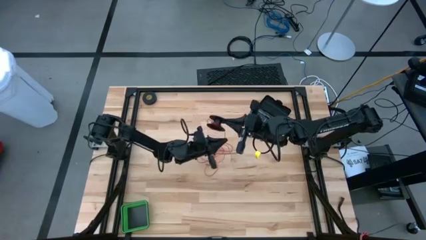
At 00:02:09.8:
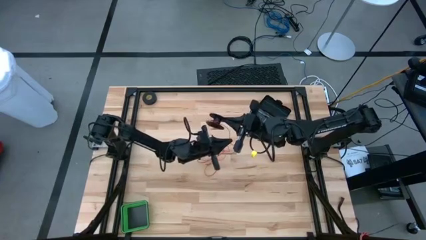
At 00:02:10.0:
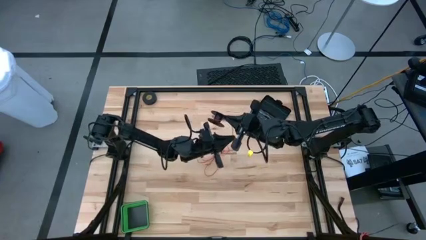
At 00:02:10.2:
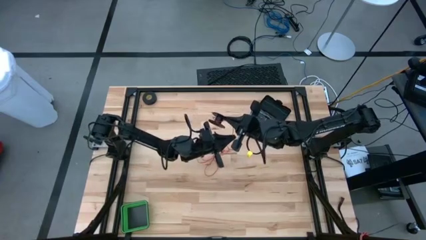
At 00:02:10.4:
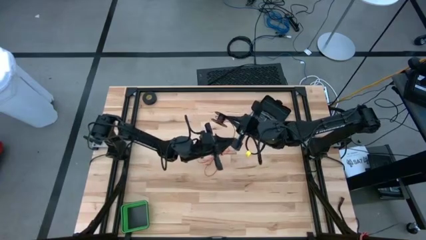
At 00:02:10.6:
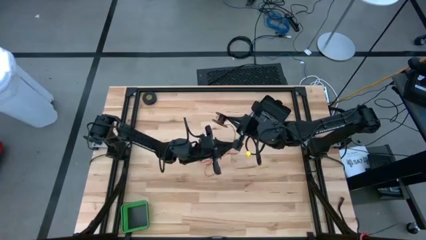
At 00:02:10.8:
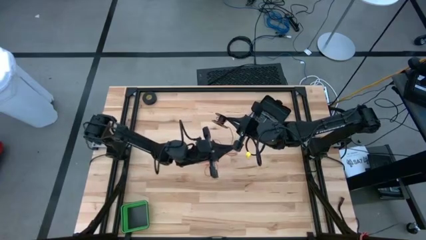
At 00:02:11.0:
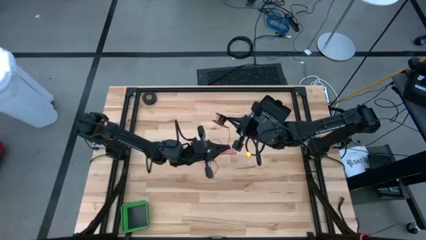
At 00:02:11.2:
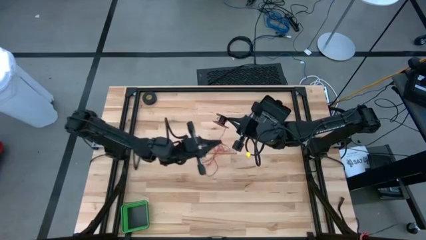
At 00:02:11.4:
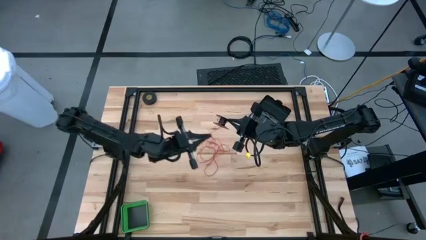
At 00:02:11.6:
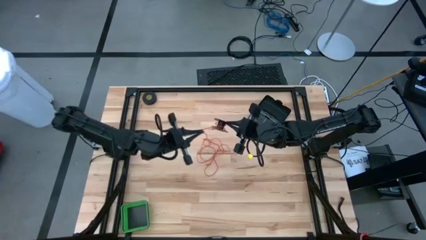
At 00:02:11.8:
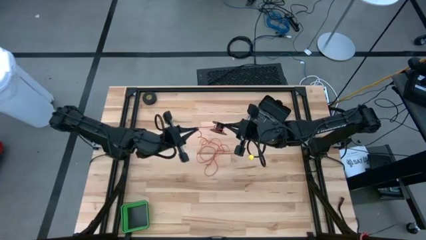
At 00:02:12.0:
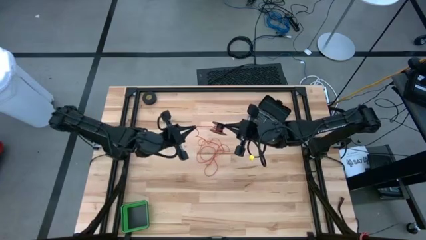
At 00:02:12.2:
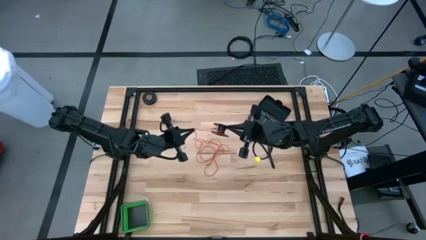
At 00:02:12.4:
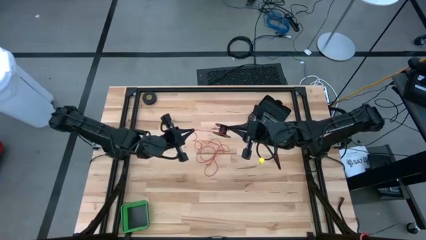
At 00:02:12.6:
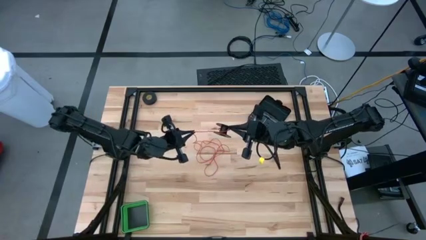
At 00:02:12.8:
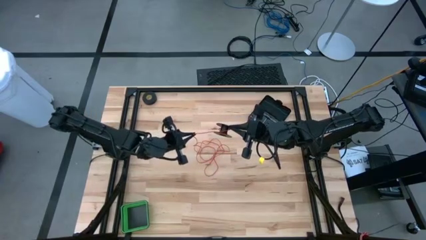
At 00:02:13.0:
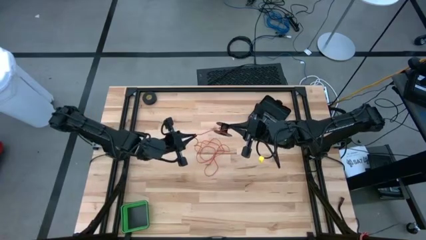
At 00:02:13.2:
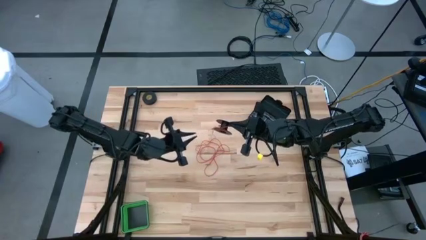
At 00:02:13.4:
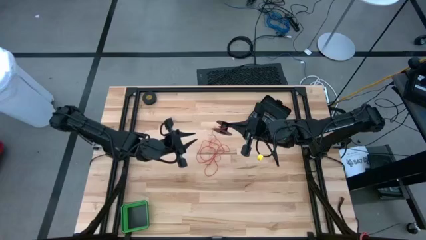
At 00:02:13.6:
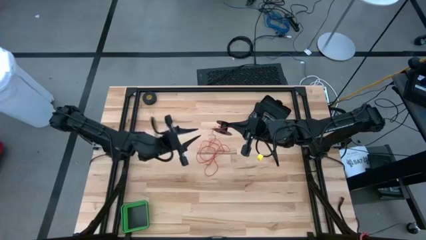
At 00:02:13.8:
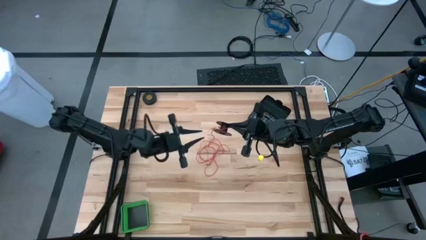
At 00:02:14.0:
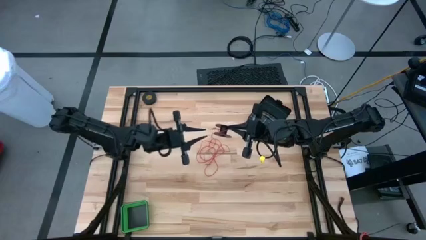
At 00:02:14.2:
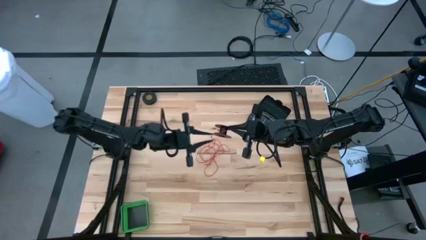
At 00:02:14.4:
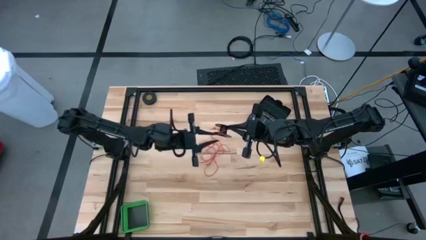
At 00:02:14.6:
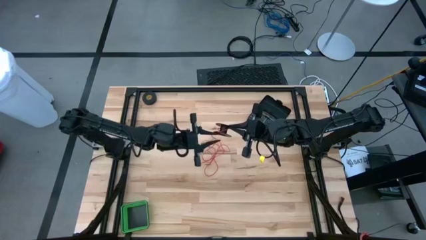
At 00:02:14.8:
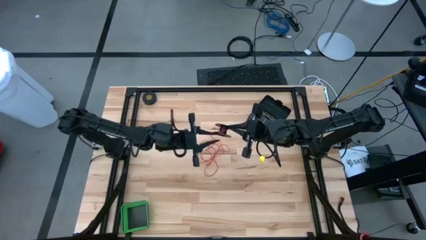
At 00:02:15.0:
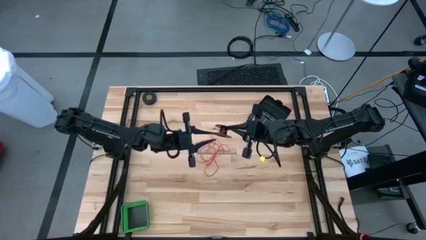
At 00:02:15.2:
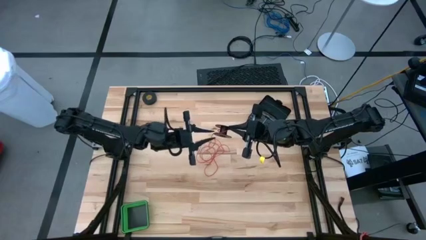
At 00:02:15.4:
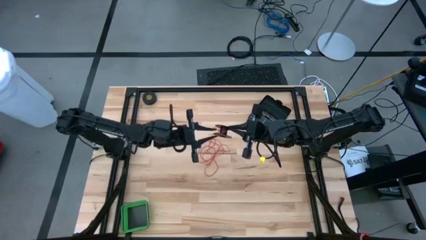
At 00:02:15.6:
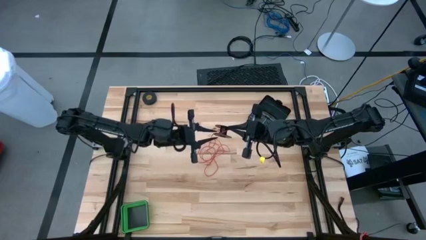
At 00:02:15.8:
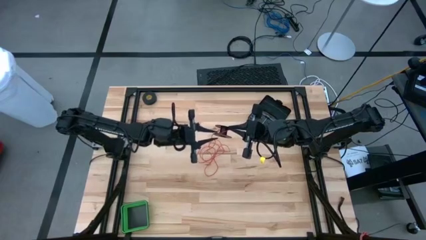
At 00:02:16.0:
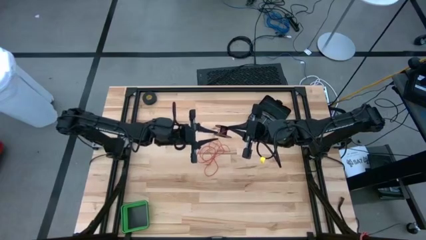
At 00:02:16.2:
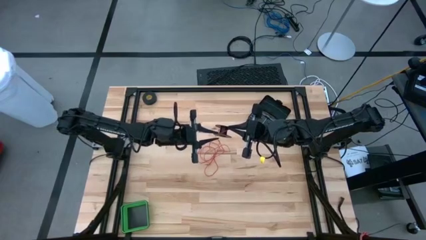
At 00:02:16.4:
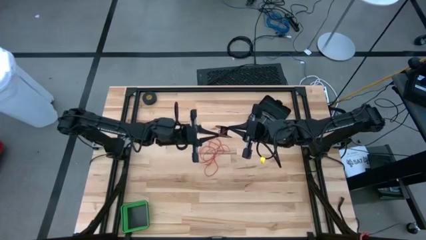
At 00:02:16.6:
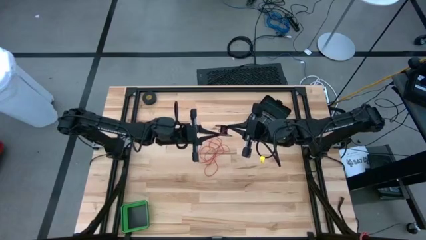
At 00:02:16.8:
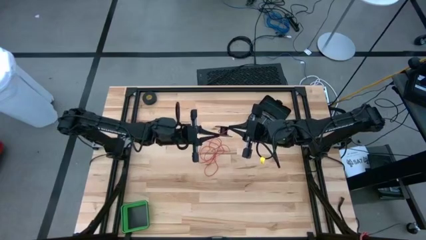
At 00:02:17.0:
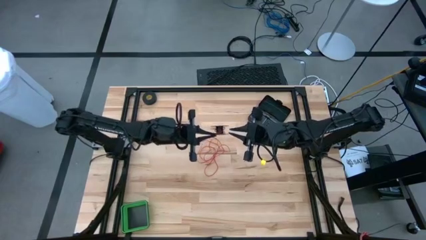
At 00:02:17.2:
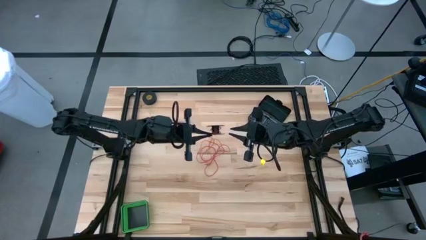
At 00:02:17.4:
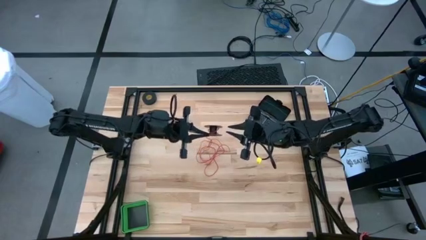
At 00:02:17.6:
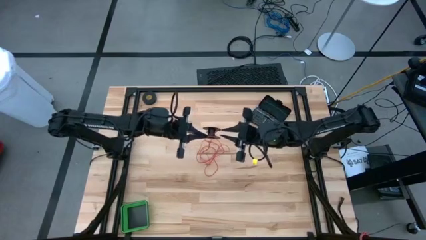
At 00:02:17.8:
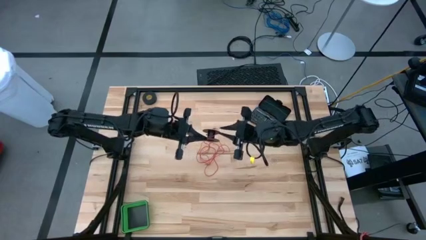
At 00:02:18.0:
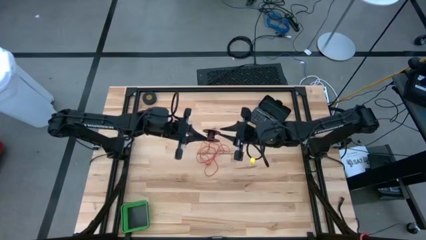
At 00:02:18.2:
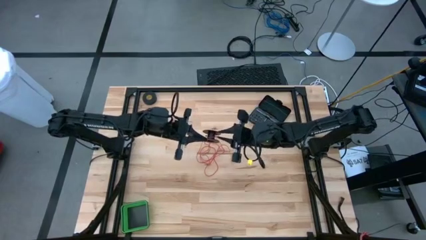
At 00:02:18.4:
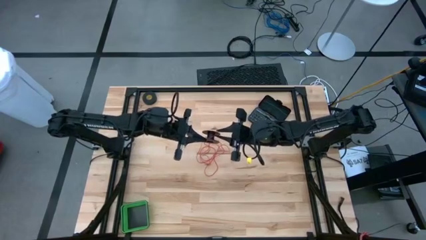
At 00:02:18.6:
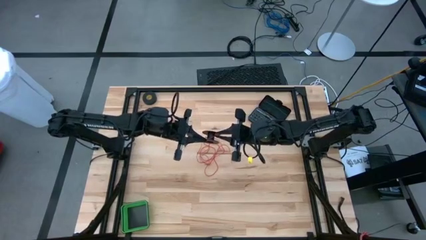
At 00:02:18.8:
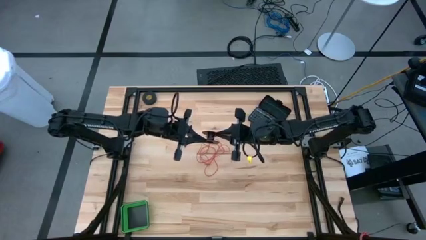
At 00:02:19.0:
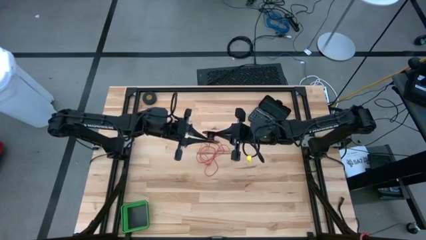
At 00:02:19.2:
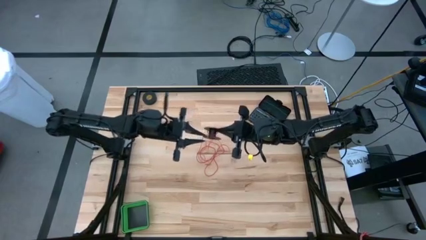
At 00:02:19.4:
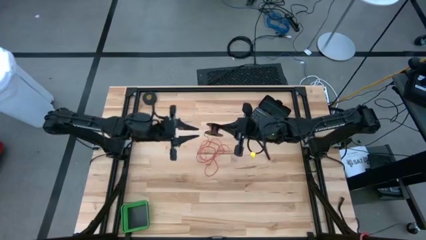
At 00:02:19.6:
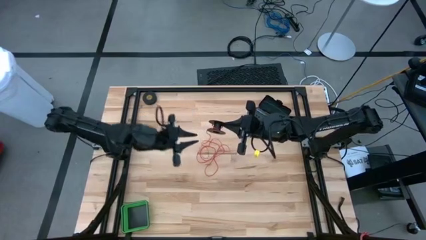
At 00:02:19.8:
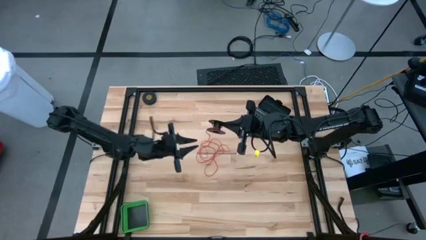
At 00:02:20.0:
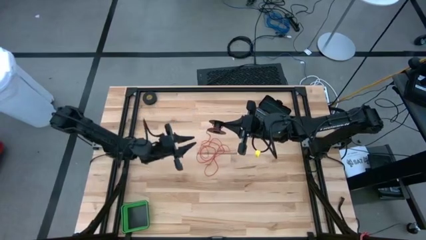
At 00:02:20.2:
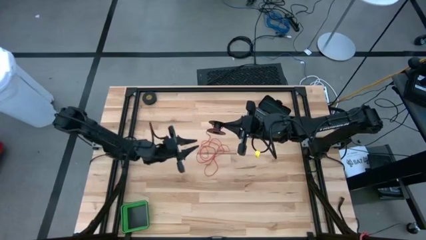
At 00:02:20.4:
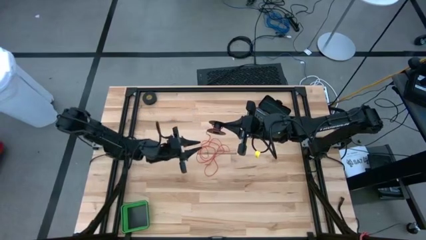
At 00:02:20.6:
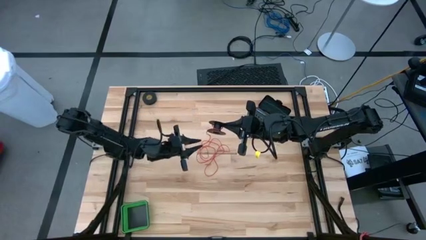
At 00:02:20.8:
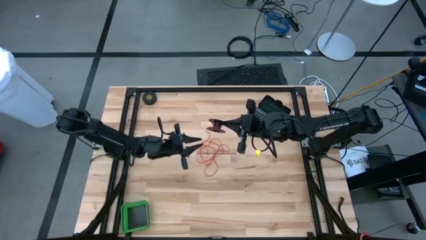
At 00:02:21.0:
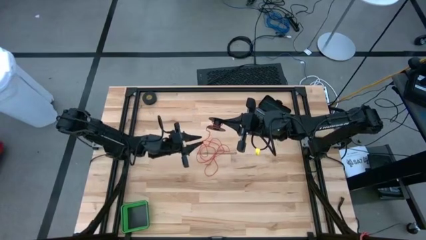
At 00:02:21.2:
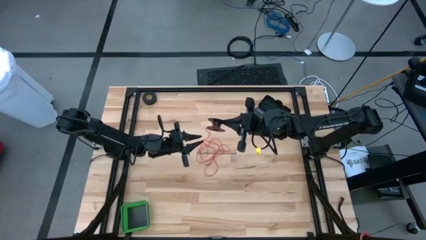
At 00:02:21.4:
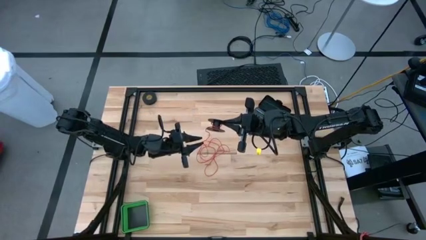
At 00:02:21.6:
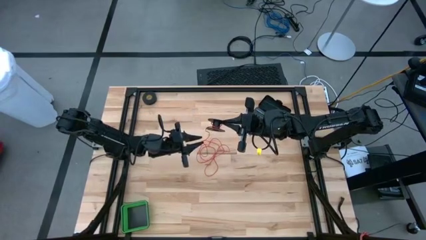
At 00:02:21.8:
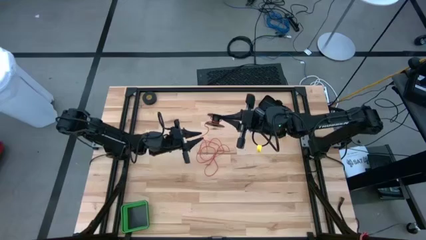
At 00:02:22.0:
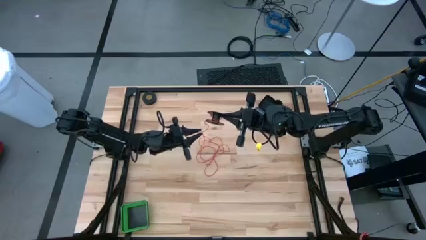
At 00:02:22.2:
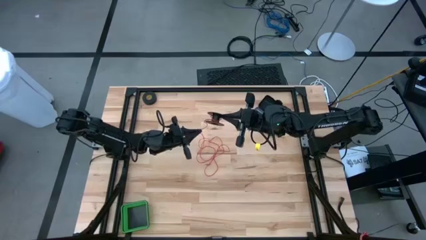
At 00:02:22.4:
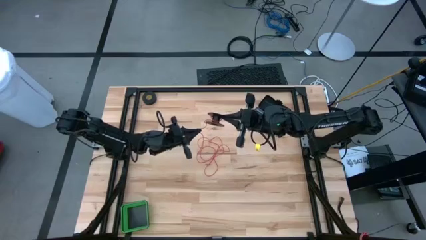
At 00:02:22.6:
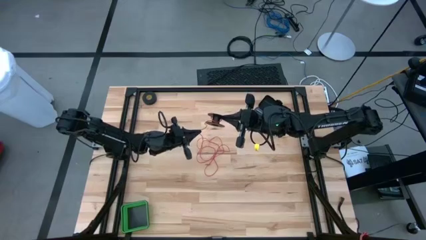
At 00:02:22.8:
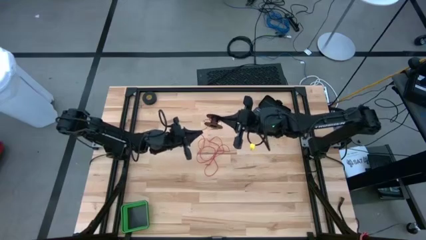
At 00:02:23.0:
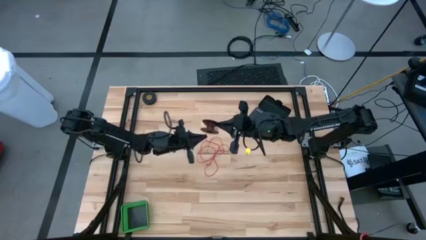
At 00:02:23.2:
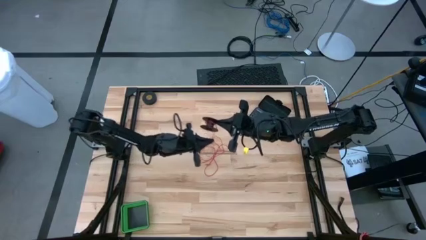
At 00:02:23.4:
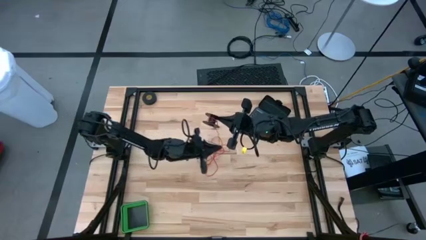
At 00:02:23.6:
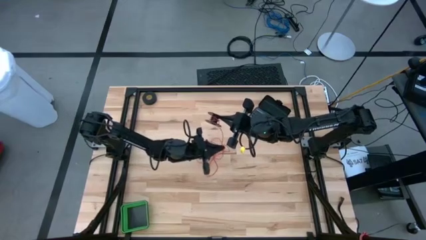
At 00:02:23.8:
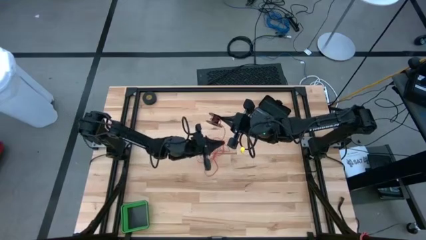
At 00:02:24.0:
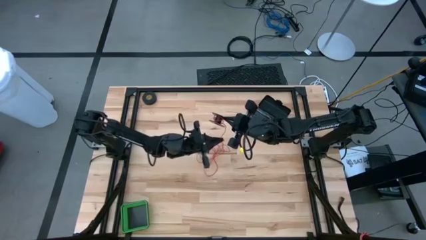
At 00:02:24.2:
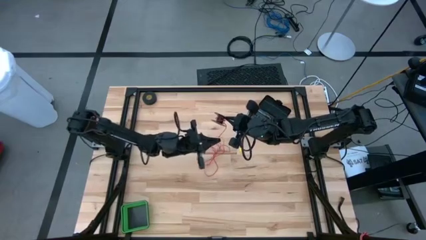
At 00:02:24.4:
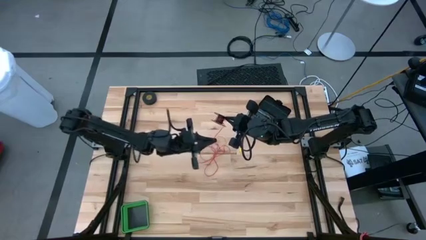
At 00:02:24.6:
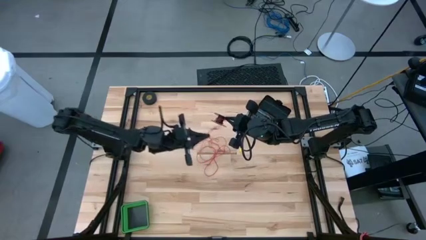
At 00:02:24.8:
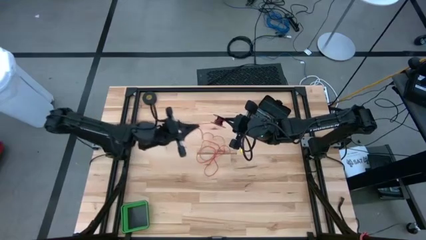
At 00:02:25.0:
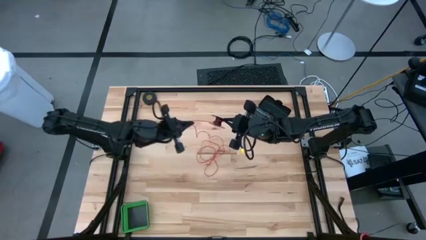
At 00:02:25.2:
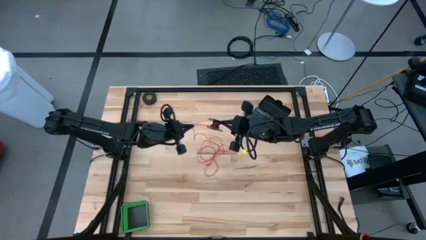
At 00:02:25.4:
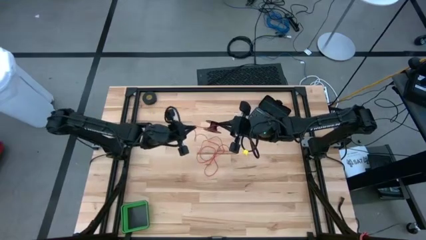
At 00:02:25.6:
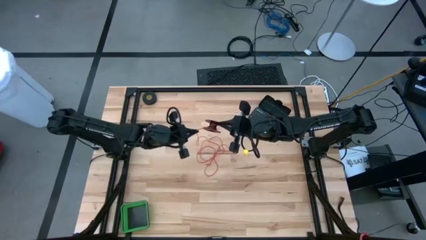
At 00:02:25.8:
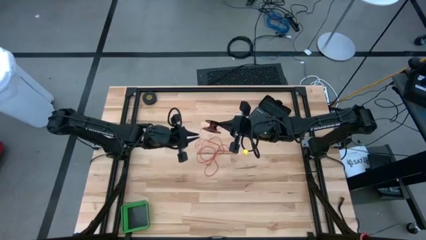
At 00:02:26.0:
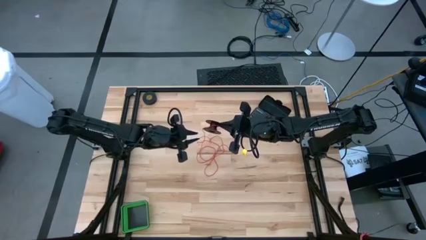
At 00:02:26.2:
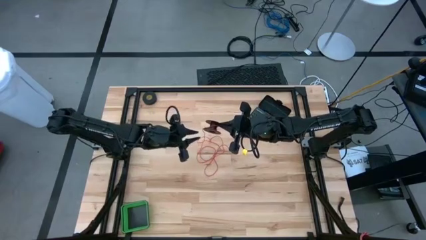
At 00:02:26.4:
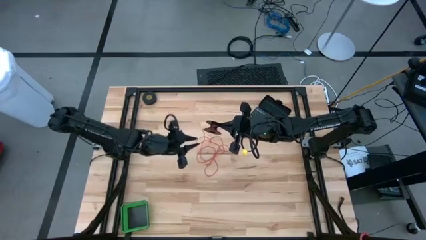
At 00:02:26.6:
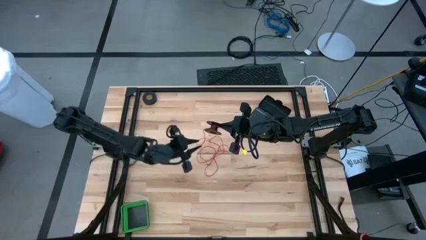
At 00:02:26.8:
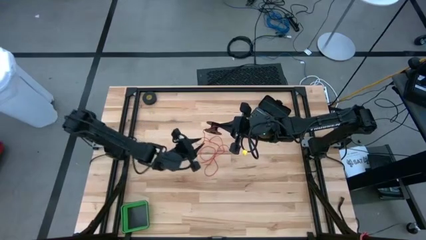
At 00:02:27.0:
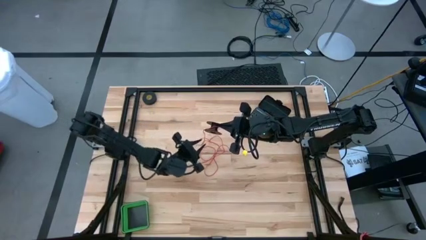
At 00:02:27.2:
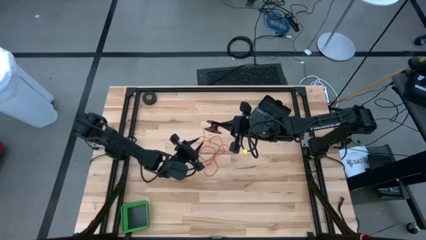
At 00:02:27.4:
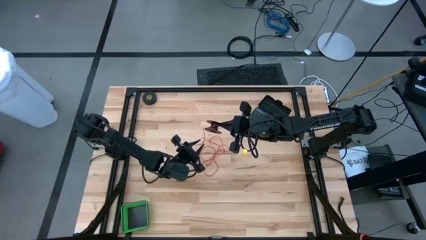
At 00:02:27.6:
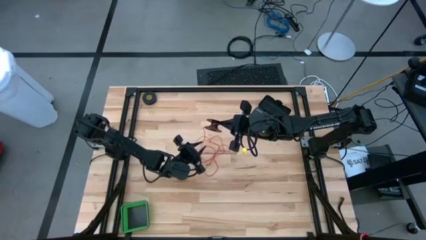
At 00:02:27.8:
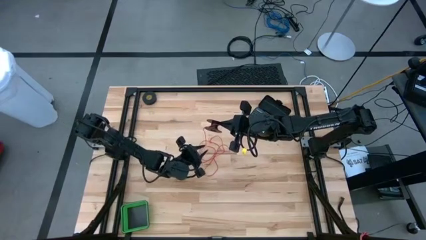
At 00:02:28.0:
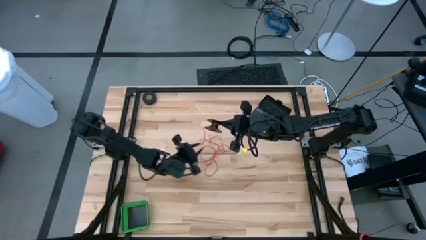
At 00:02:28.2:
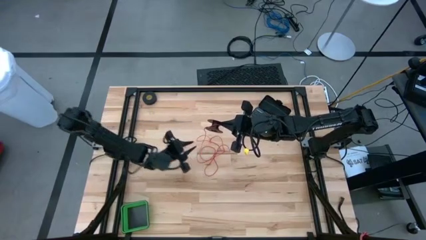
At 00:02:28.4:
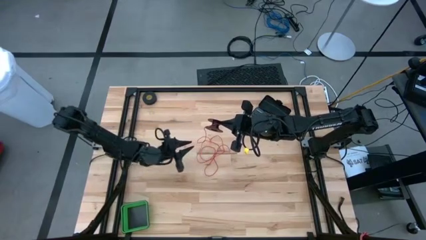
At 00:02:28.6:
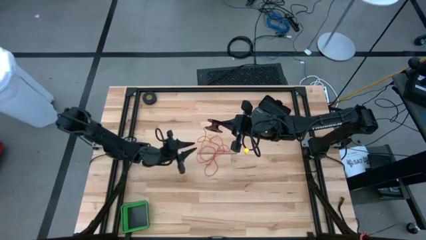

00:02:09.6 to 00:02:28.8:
Task: Coil cords
Coil the red wire into the spool
